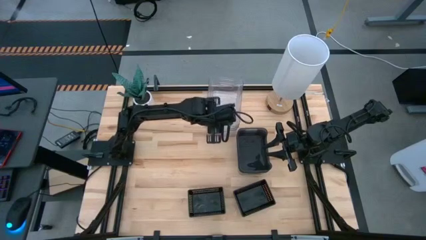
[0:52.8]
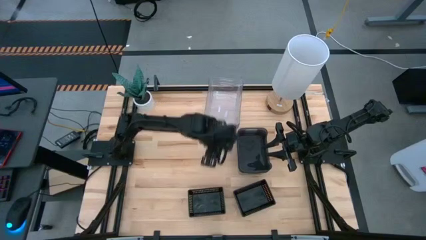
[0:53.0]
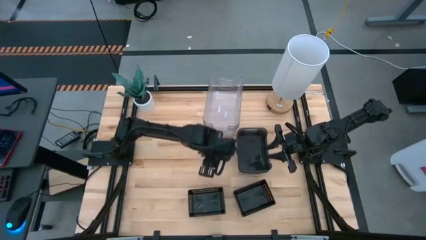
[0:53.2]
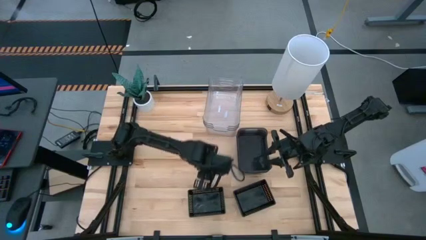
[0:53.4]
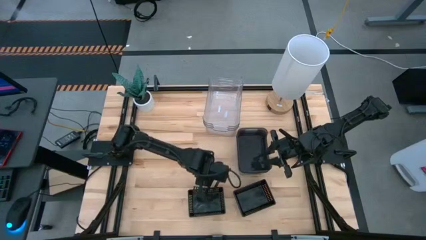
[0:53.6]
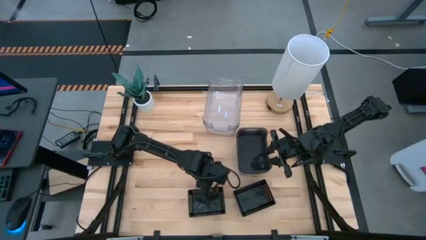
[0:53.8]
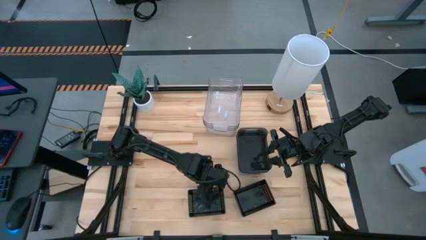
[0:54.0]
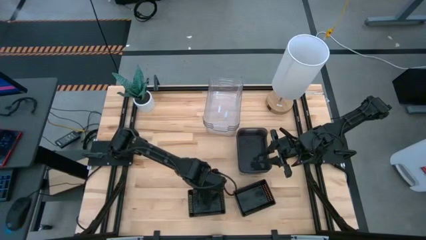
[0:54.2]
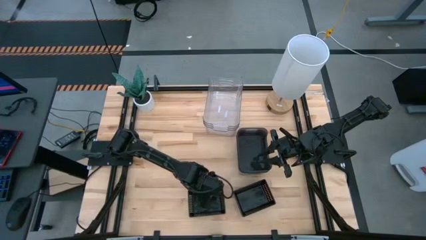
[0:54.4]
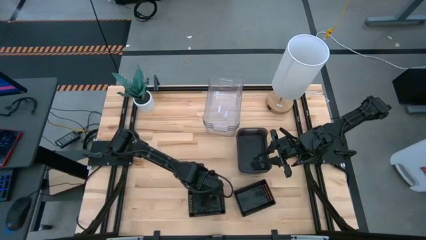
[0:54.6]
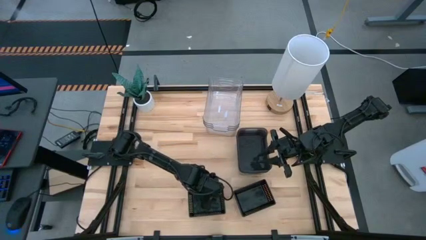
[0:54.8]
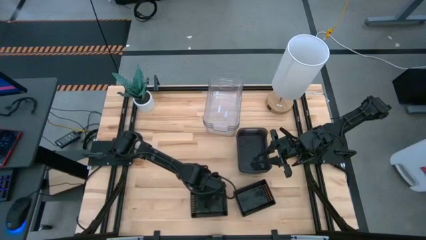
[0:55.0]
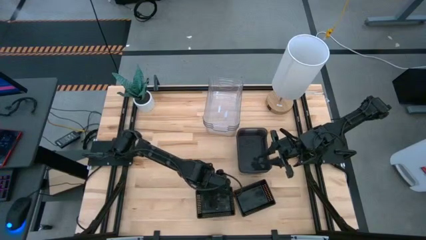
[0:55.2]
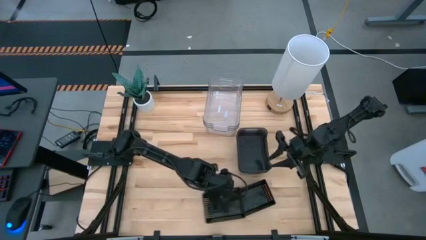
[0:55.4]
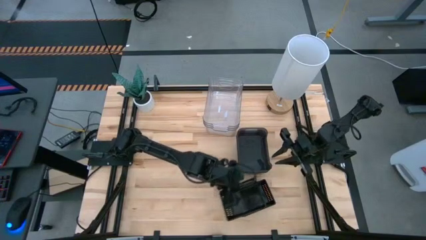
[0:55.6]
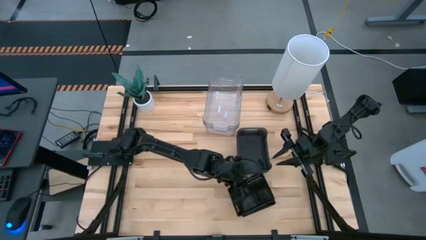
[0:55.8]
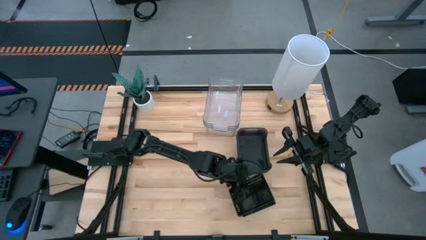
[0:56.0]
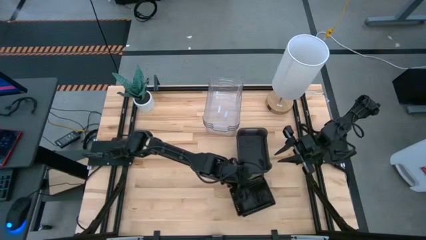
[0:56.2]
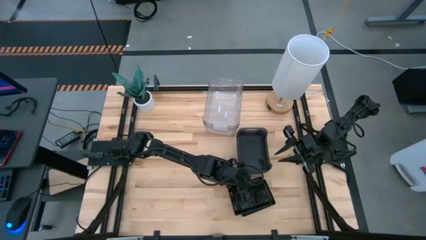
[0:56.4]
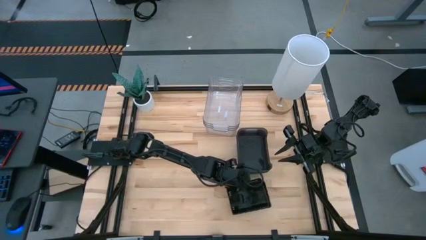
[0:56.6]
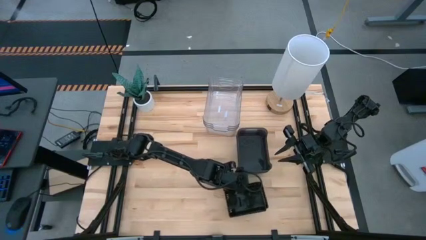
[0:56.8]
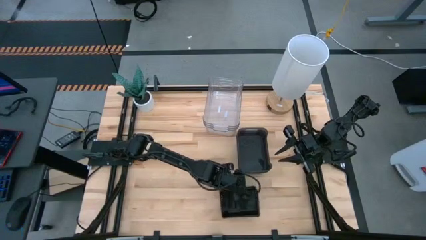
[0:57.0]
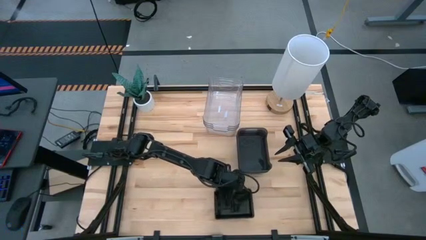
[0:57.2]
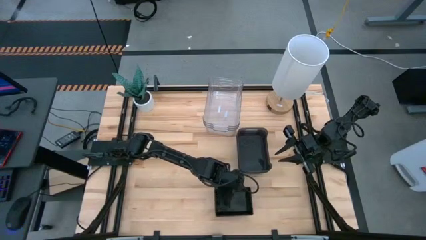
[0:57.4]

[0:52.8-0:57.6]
Stack the left black bin on top of the right black bin

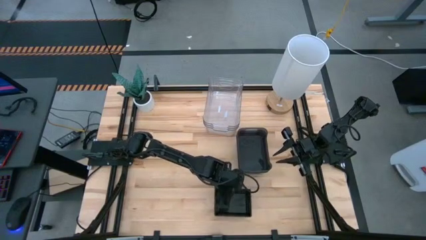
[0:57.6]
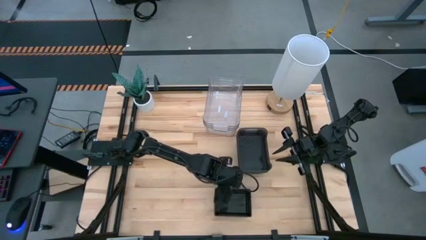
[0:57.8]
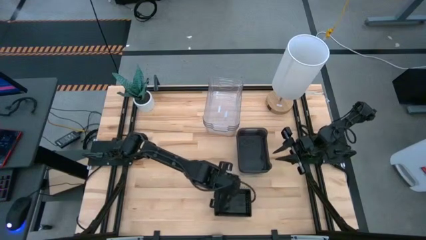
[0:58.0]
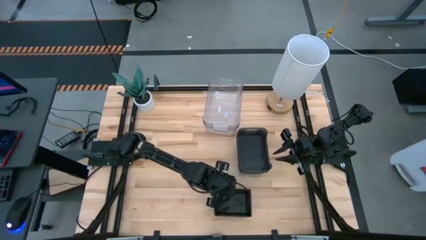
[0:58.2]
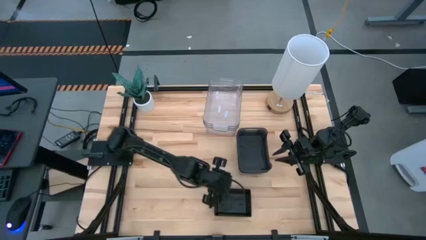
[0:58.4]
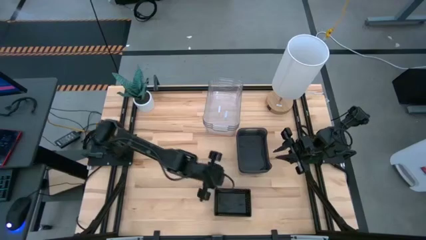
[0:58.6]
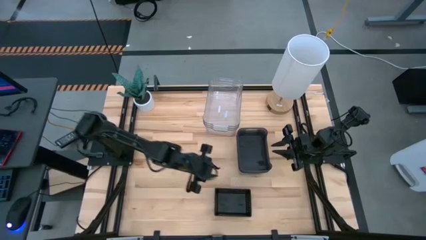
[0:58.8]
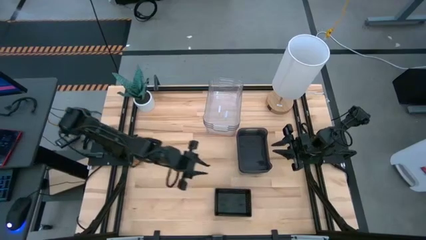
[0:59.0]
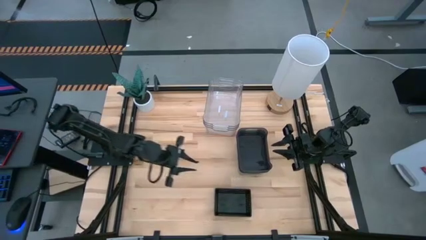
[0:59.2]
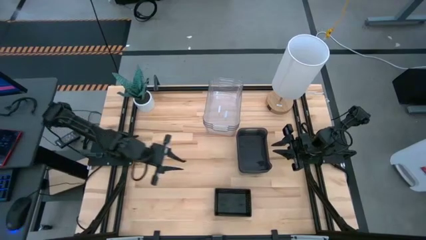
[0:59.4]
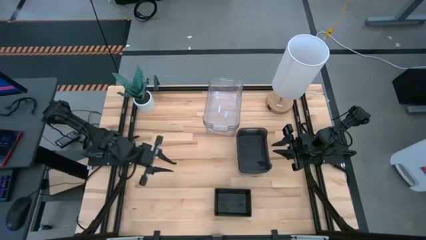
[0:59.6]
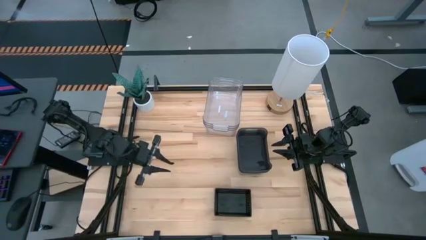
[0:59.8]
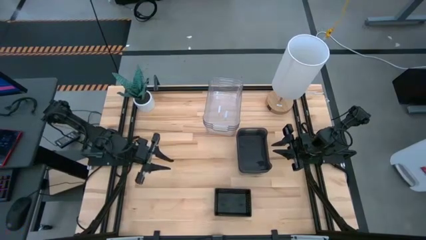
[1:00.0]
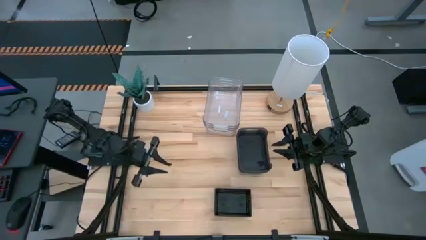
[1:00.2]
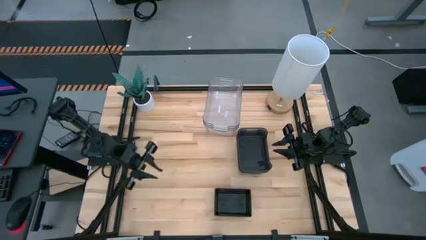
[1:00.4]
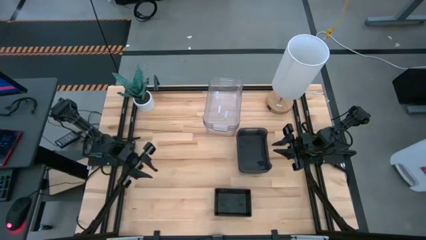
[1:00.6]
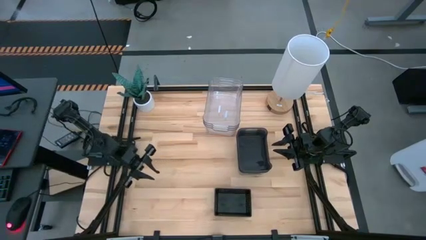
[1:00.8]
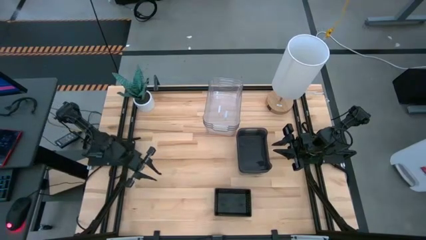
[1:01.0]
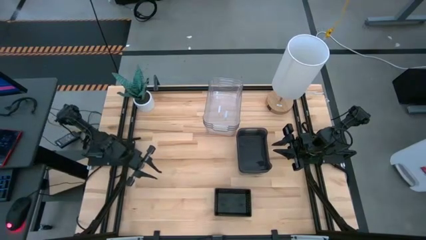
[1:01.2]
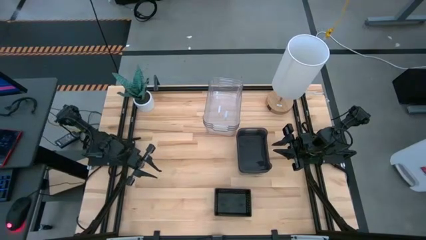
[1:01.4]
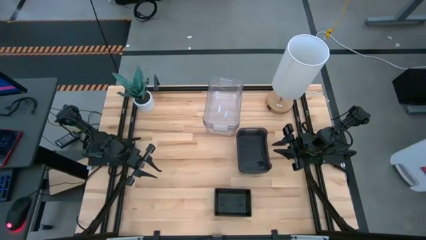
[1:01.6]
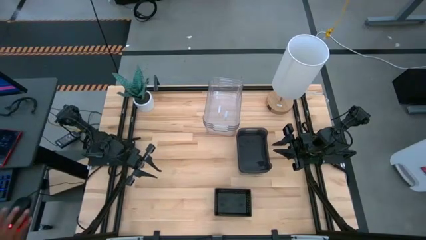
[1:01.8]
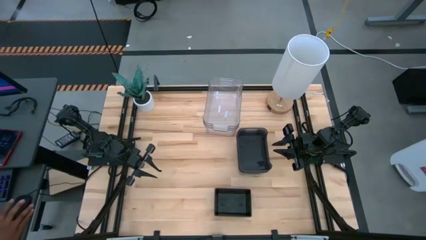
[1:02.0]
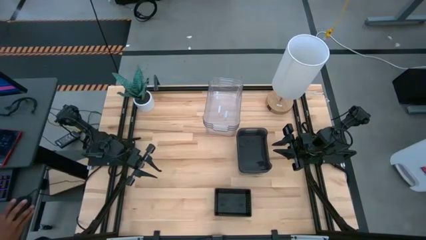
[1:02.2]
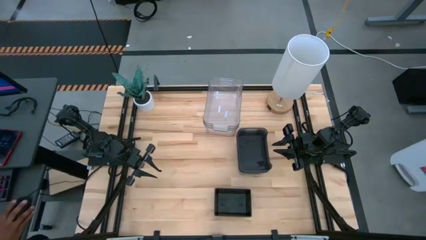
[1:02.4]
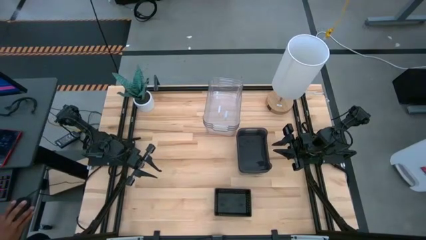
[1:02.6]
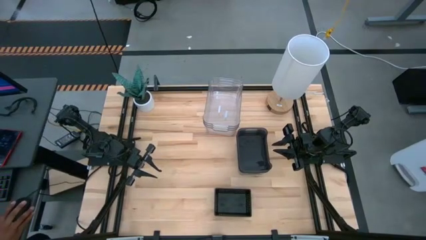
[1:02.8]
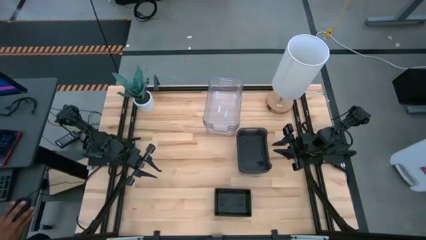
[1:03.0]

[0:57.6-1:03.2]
Return to Home Position

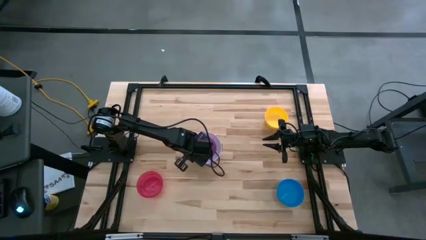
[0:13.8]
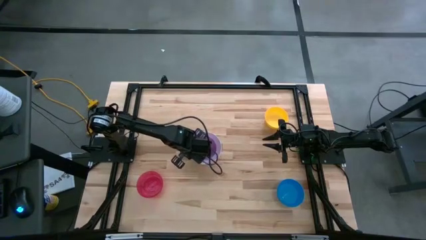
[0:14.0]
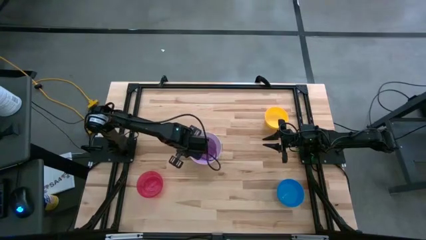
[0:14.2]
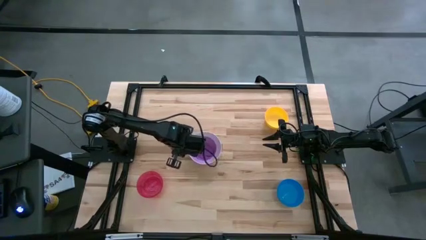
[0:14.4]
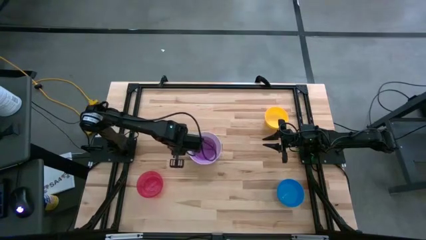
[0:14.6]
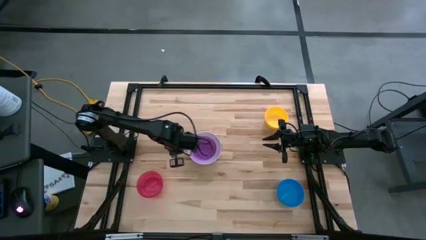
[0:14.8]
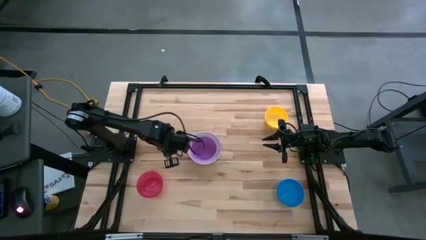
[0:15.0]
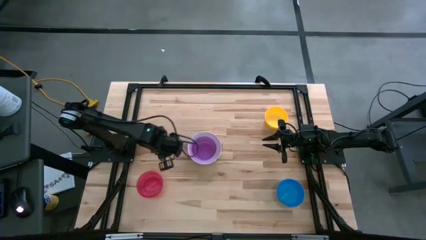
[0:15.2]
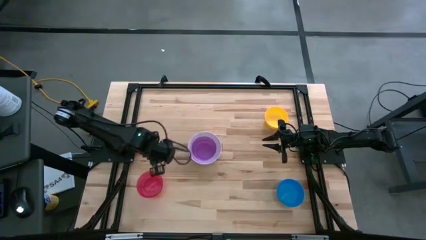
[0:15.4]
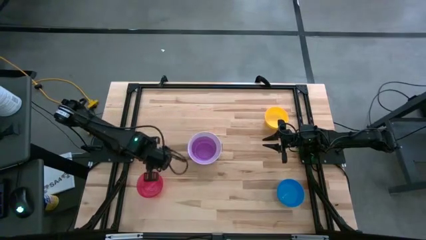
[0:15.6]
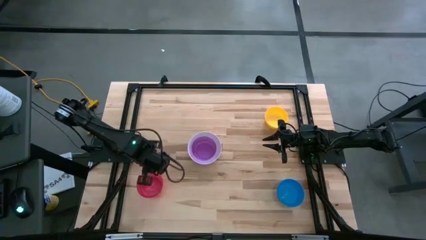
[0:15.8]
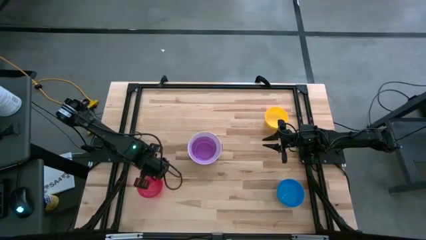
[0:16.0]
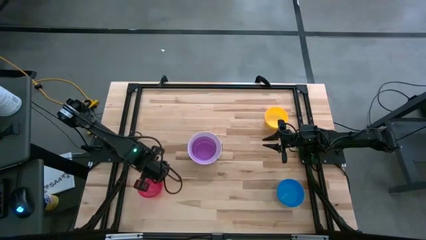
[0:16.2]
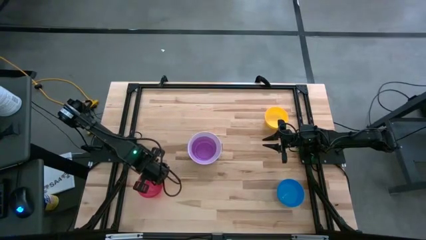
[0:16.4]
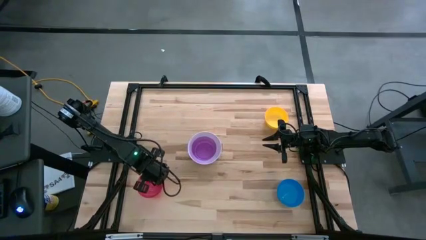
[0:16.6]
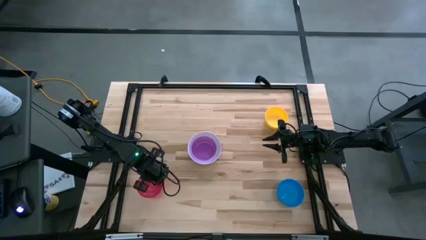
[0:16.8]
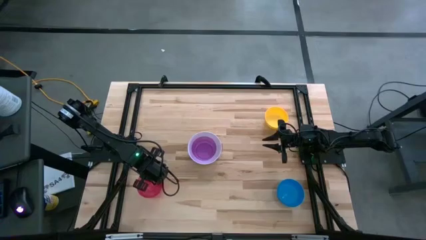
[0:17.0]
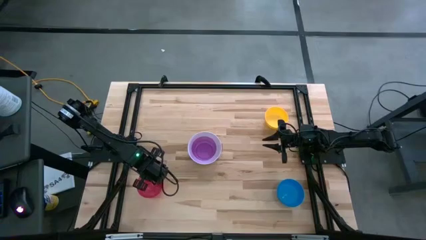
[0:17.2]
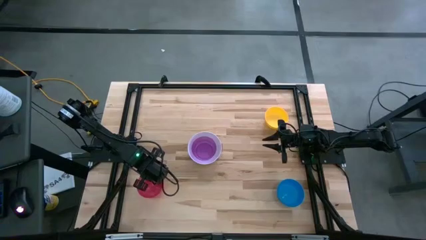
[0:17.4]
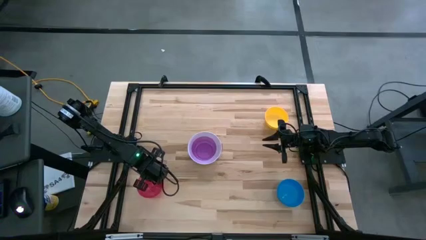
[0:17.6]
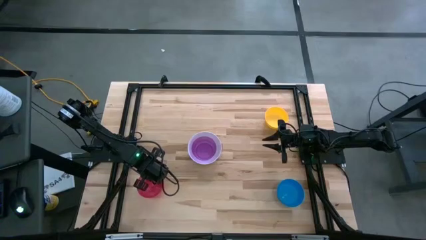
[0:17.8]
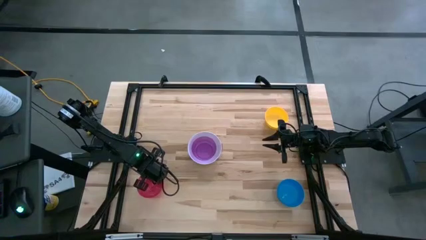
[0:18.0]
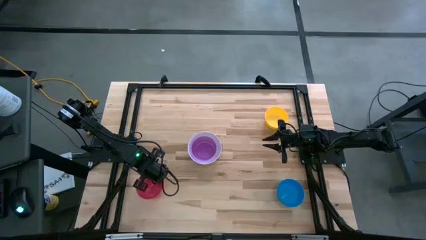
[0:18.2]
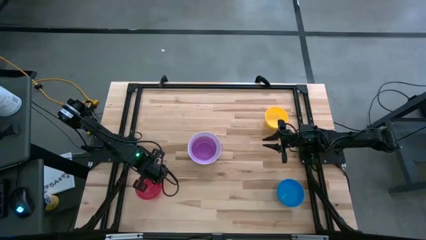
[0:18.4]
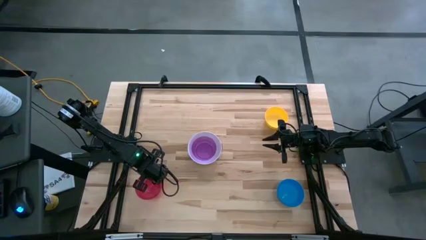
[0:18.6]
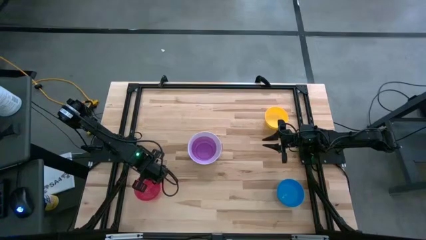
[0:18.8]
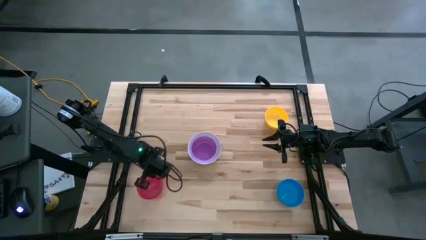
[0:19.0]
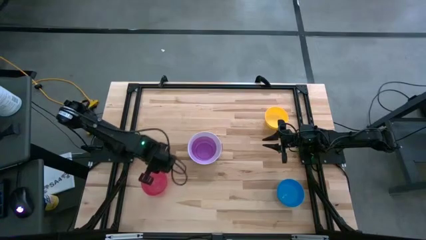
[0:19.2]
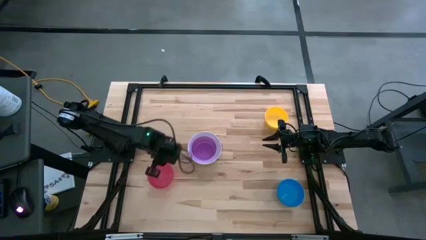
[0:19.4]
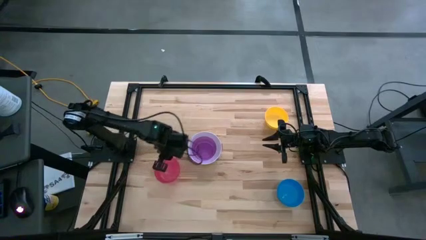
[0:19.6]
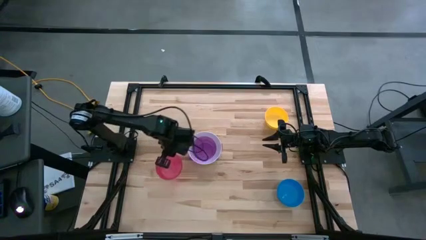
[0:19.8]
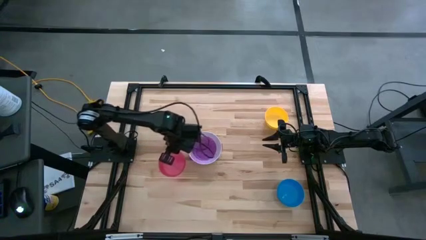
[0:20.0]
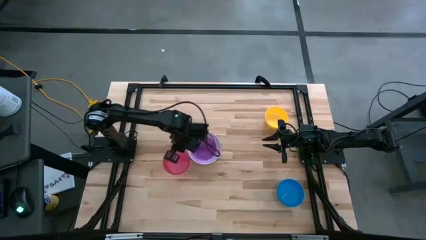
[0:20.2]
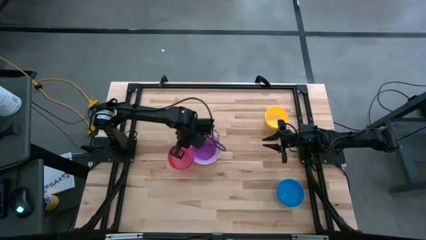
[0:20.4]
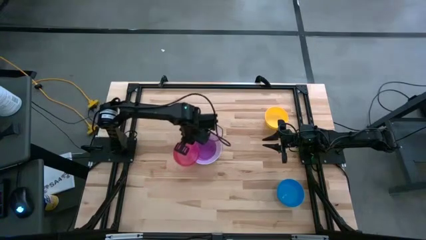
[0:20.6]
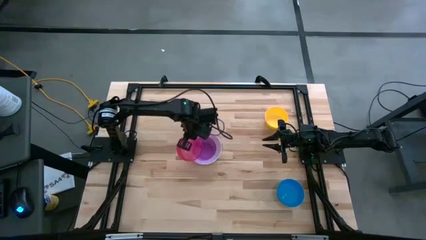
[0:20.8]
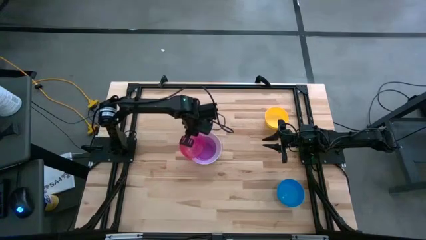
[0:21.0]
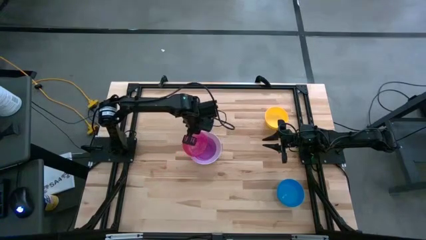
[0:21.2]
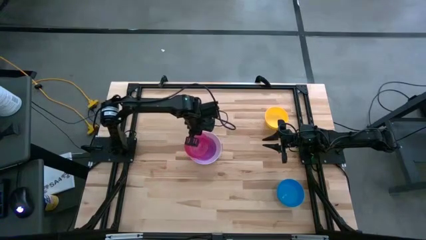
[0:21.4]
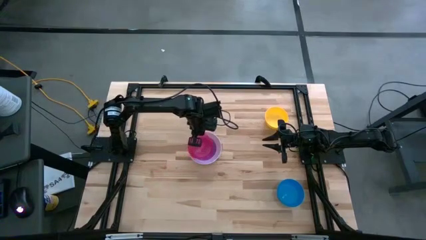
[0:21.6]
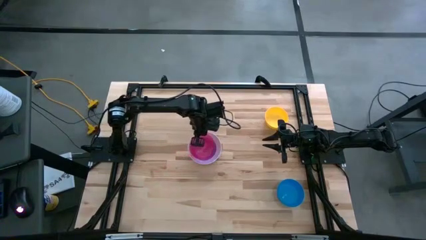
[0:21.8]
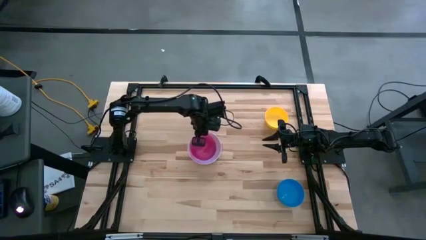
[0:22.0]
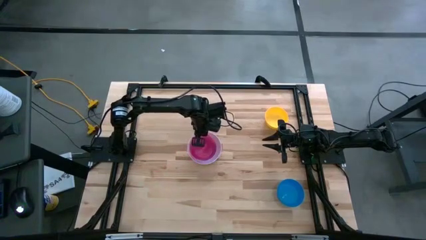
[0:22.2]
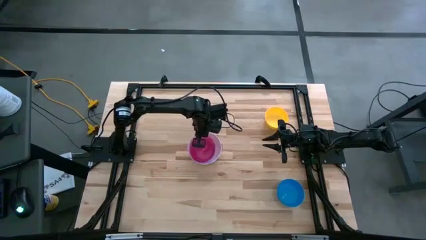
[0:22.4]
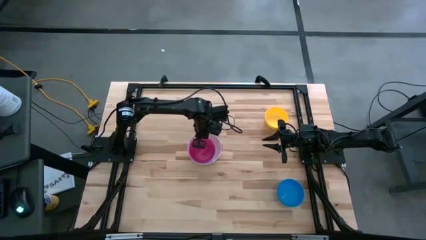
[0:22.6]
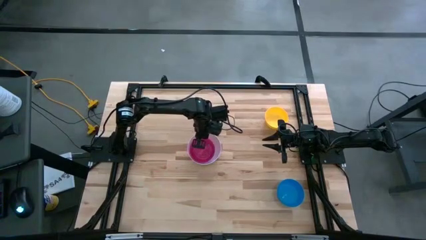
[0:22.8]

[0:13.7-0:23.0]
Stack the red bowl on the violet bowl
